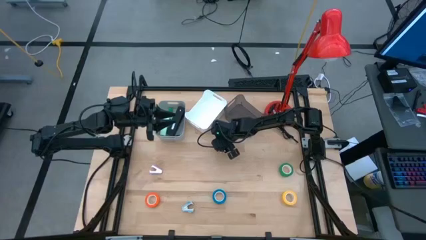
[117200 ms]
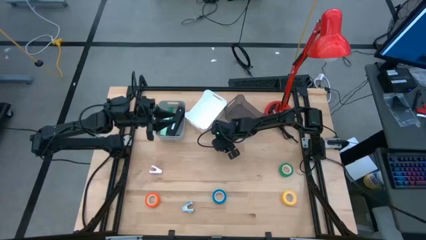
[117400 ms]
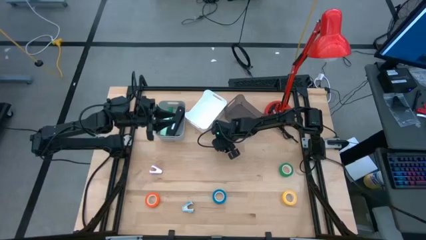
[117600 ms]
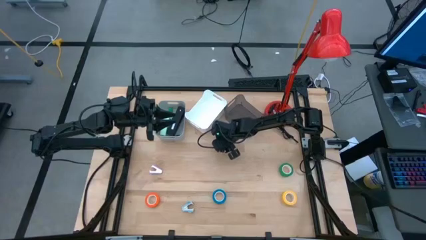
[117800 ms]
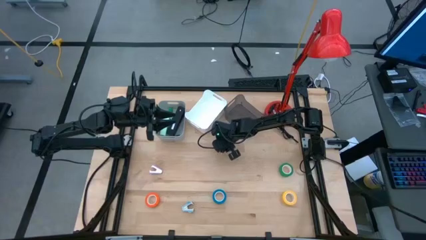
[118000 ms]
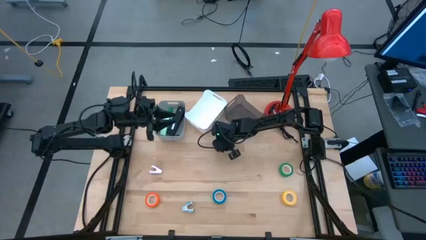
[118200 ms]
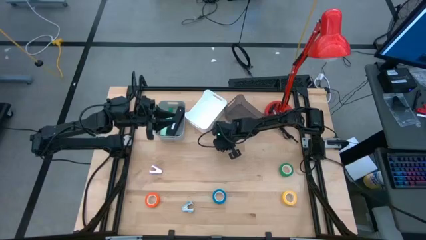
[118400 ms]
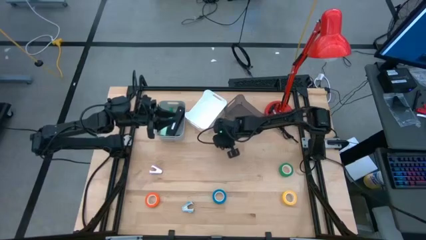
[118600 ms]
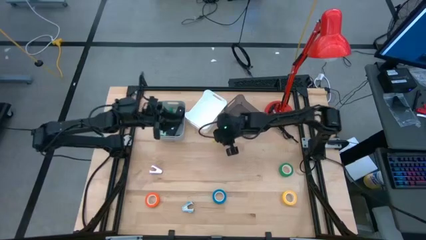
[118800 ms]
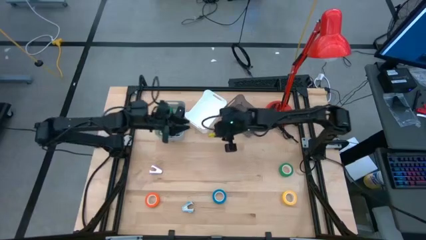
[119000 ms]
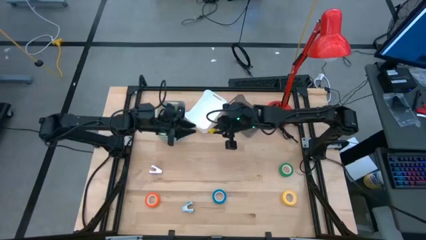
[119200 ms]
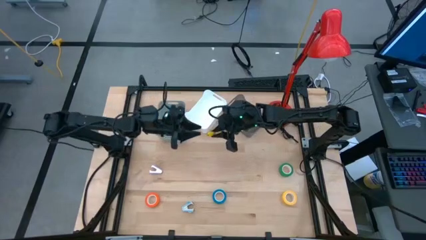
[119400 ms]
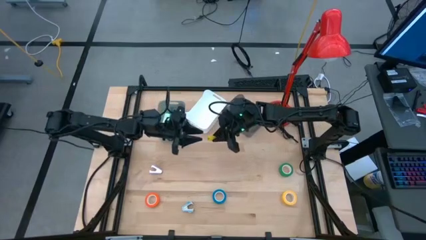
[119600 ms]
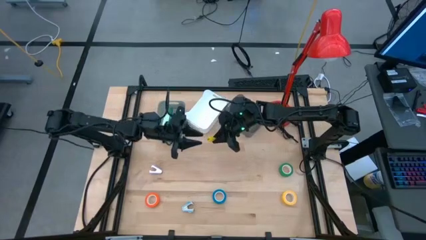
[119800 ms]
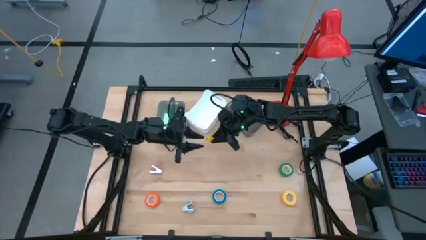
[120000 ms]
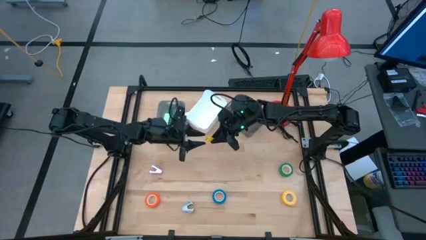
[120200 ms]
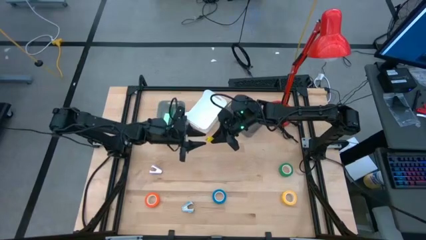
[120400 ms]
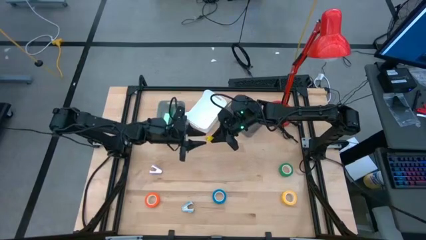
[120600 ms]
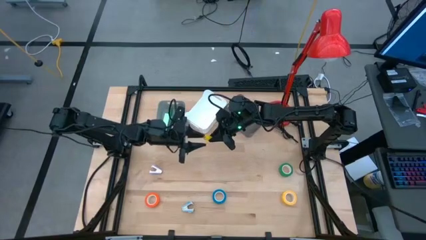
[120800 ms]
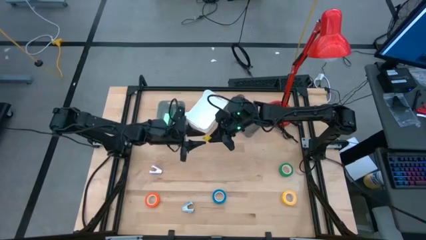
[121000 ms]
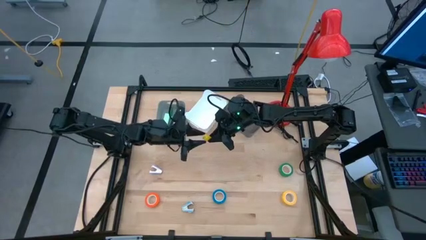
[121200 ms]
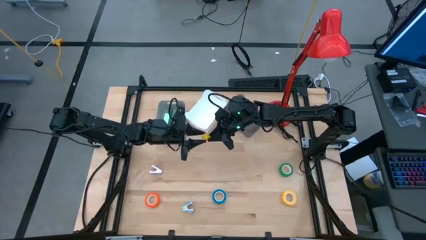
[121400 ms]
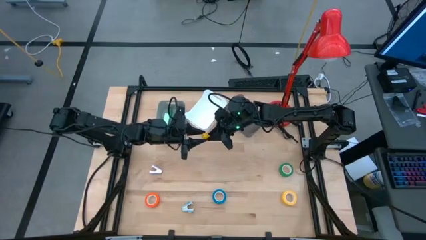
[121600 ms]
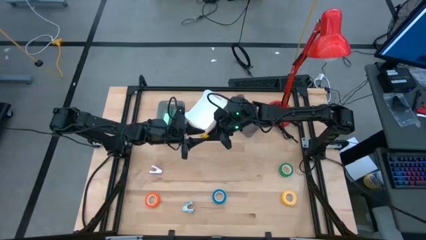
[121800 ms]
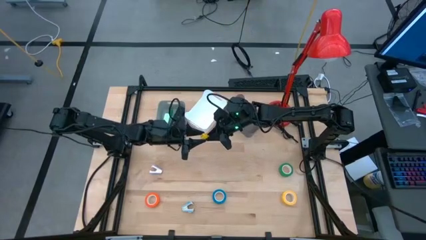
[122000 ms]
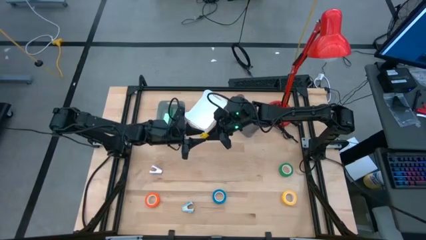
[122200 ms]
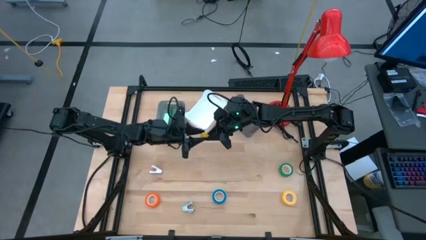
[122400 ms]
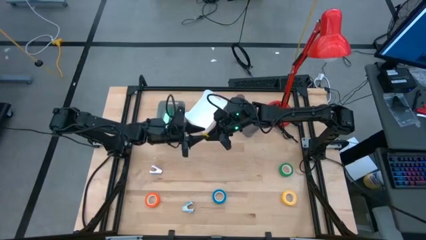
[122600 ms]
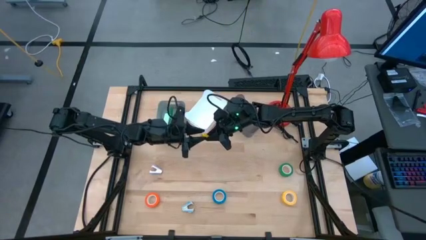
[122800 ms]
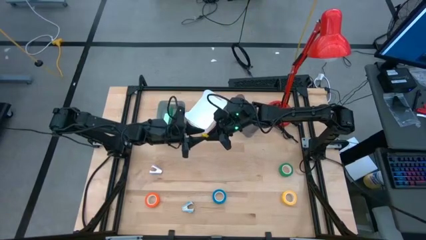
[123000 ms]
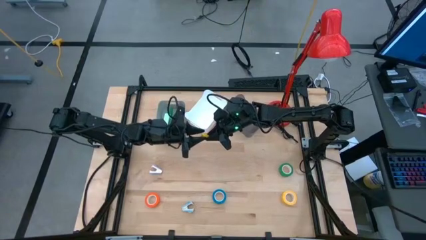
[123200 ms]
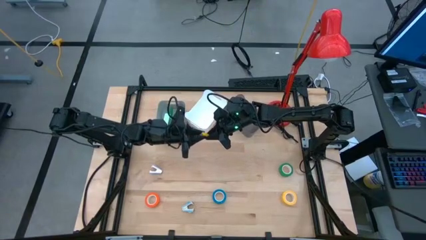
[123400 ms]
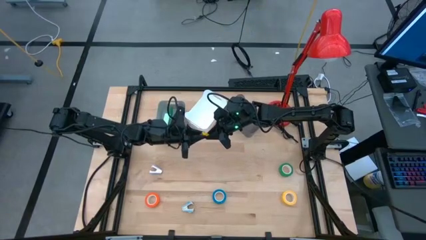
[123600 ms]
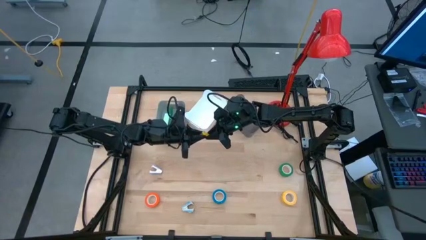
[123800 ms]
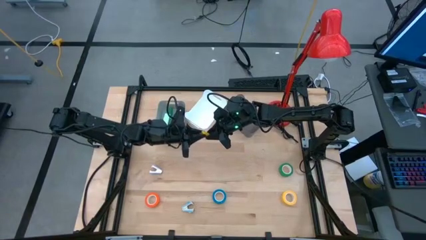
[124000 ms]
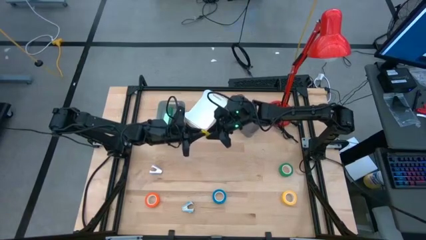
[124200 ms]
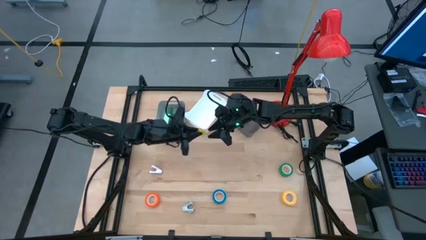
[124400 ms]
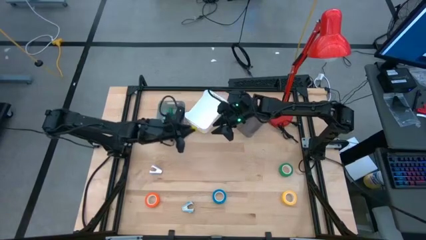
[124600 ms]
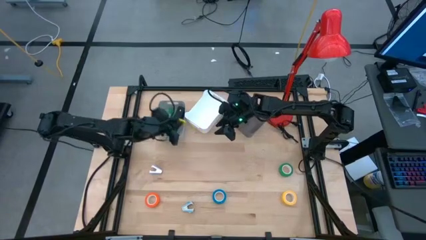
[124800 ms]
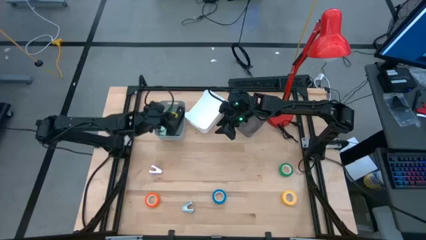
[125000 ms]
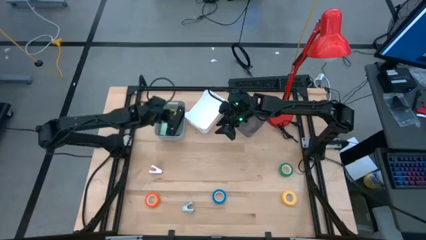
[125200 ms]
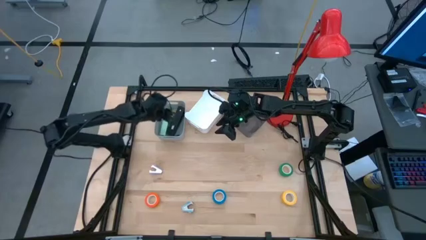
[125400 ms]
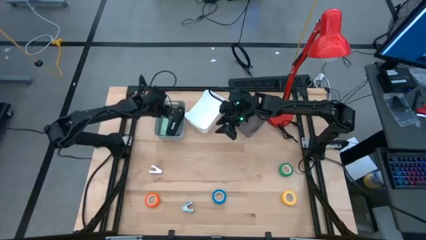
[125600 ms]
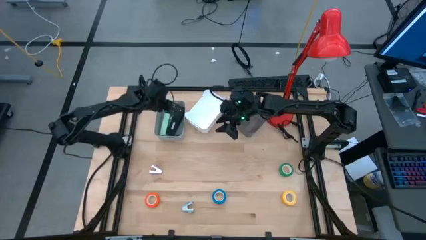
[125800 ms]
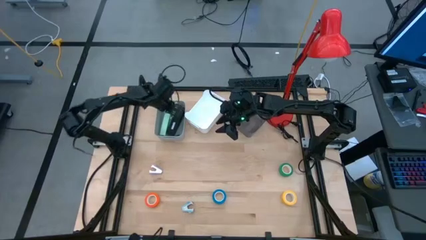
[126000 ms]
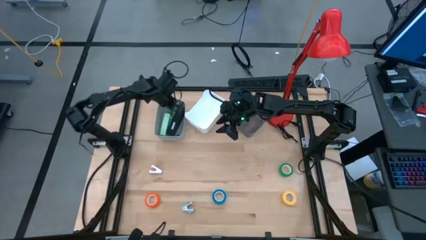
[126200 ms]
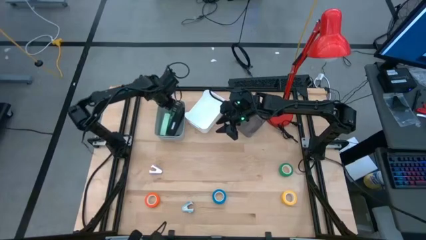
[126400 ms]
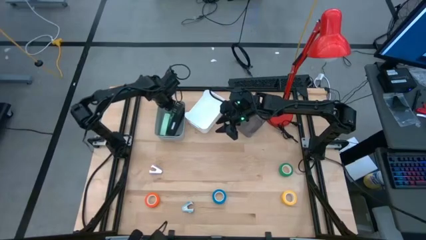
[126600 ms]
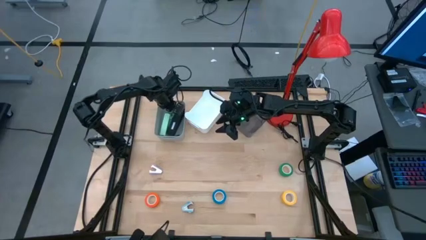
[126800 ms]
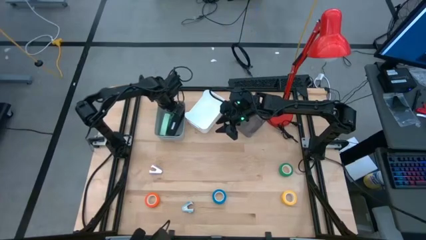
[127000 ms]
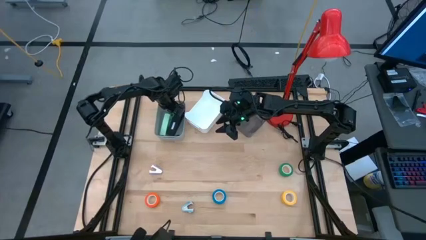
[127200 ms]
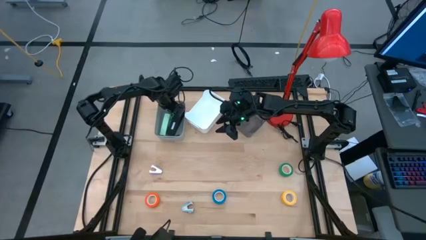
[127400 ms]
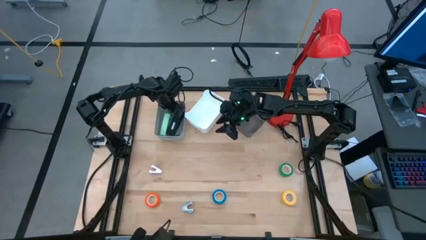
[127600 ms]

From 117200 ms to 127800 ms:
Task: Pick and place Stapler, Stapler remover, tape
Put the small yellow stapler into the gray bin
